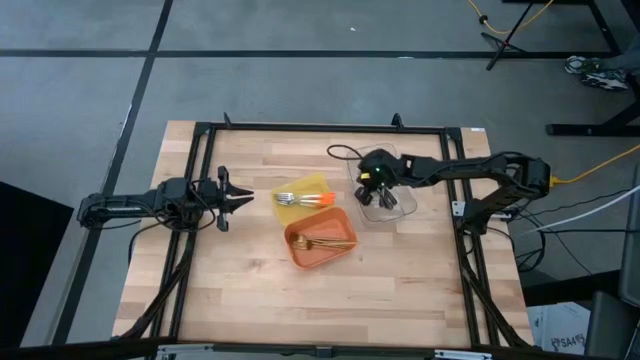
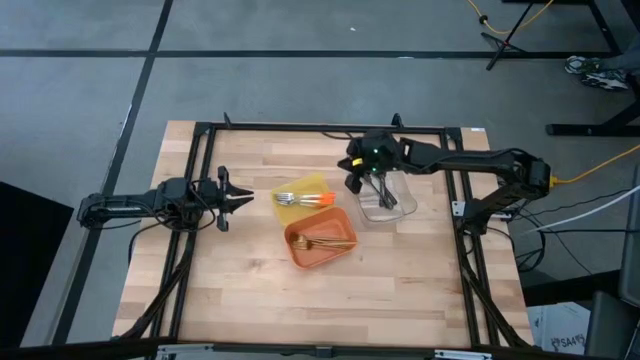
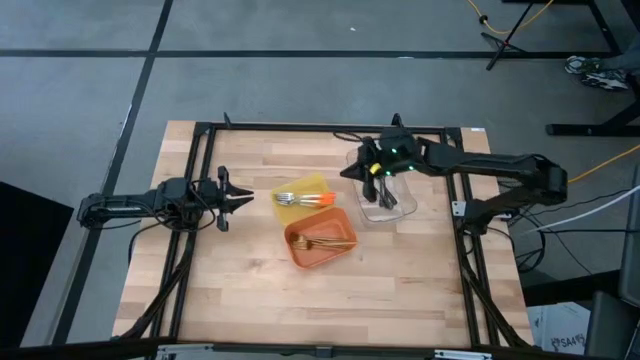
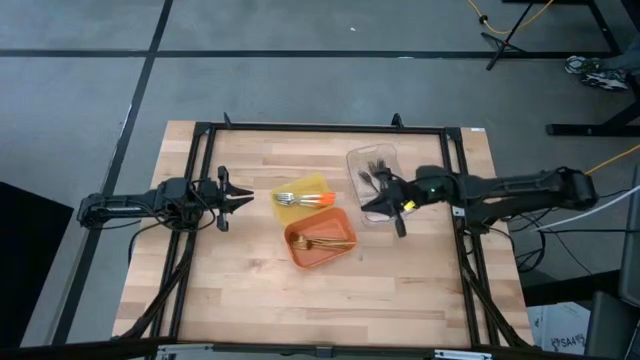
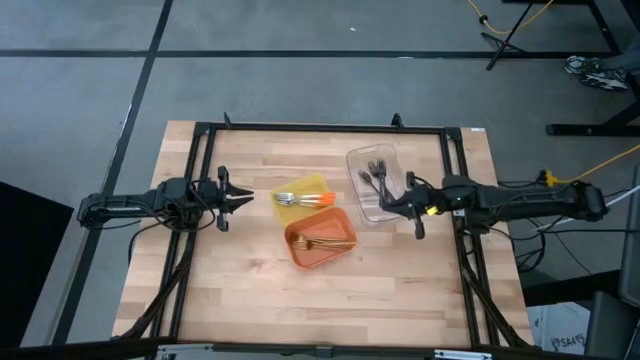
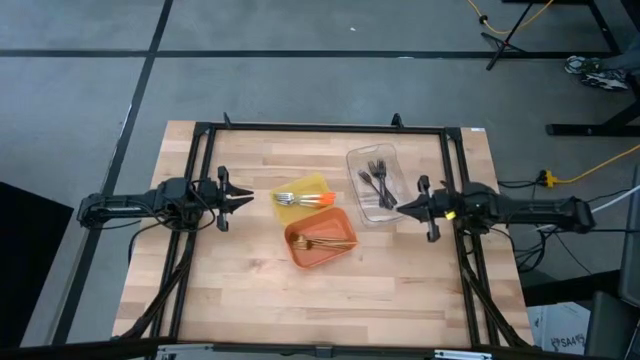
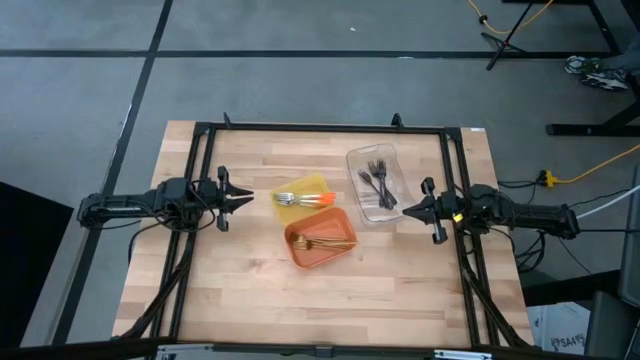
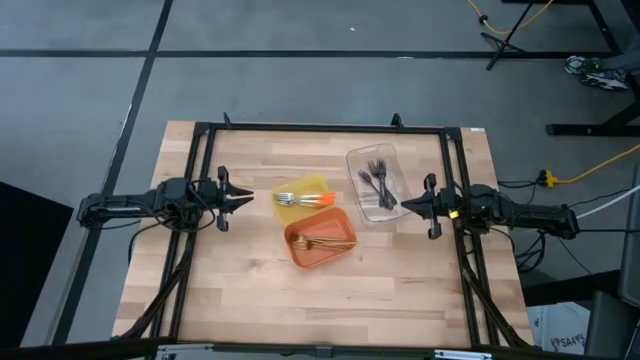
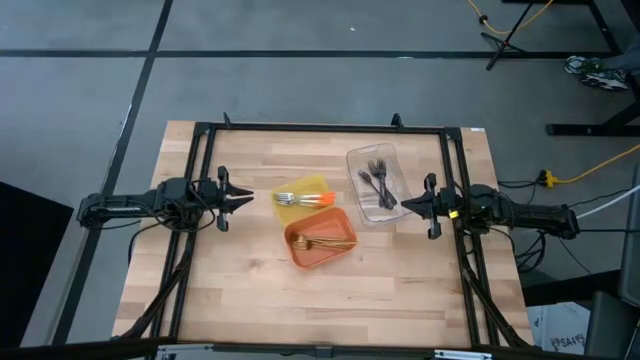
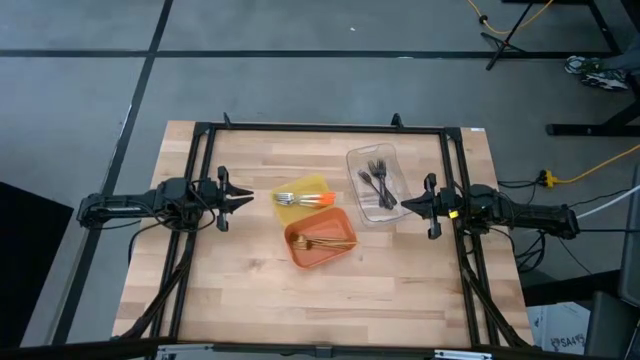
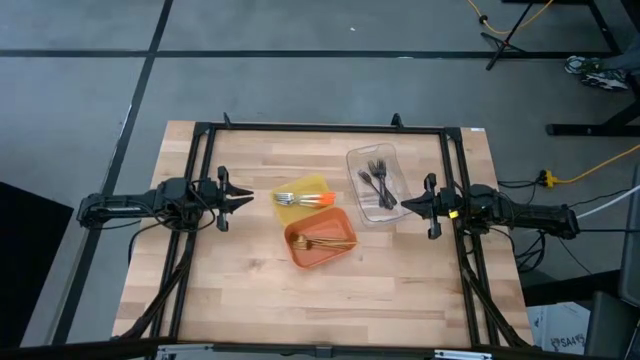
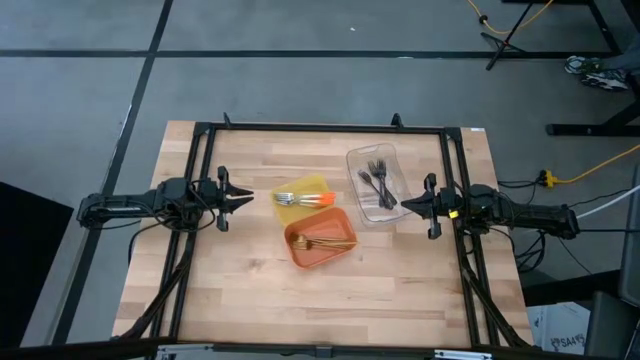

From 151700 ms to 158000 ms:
Task: Sort silverware by color (type)
Return to Home Position

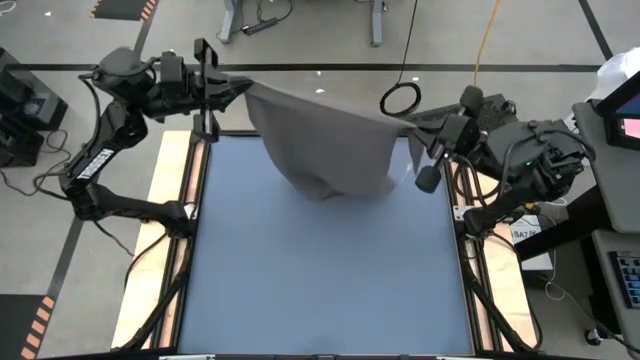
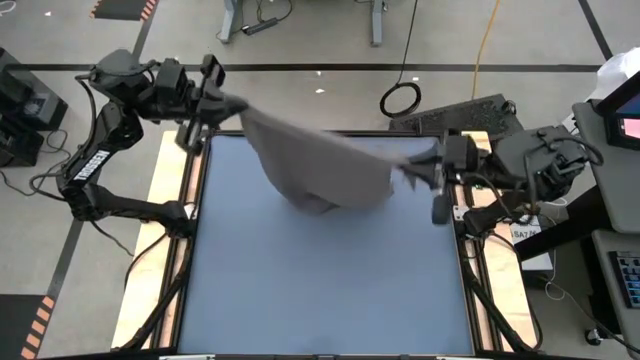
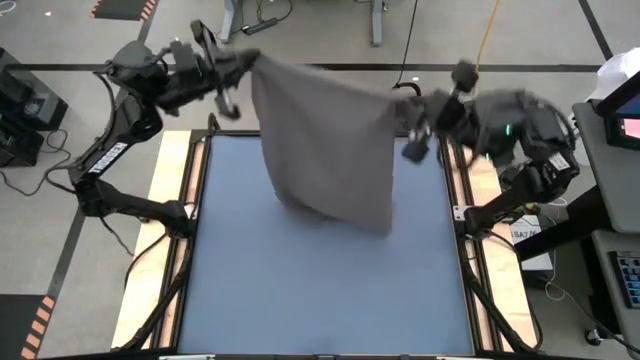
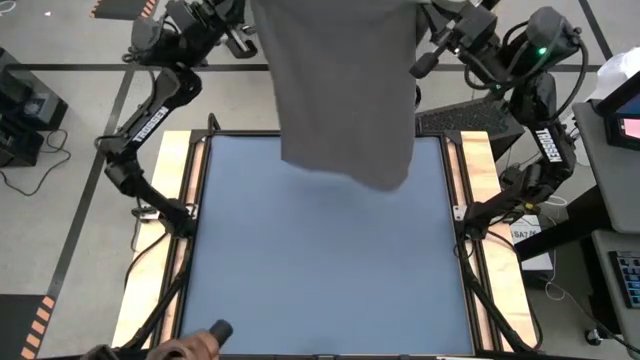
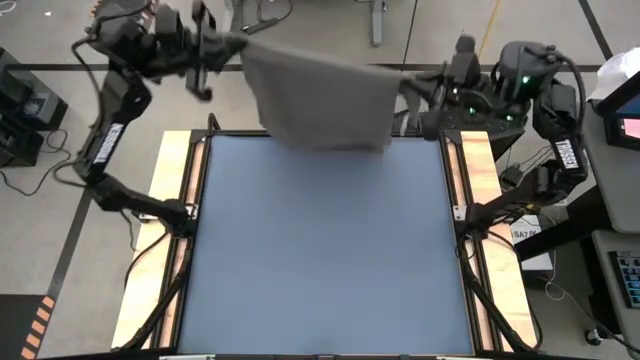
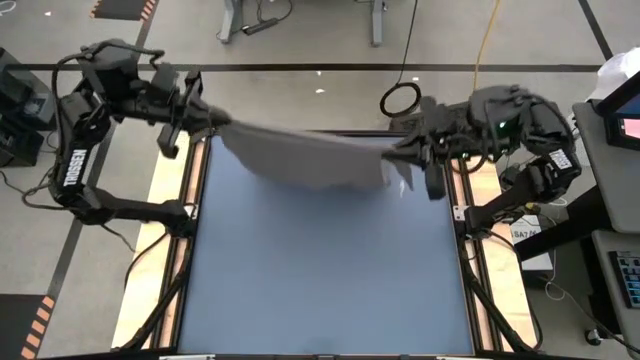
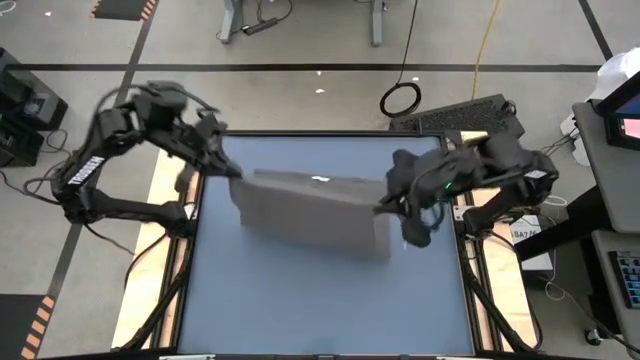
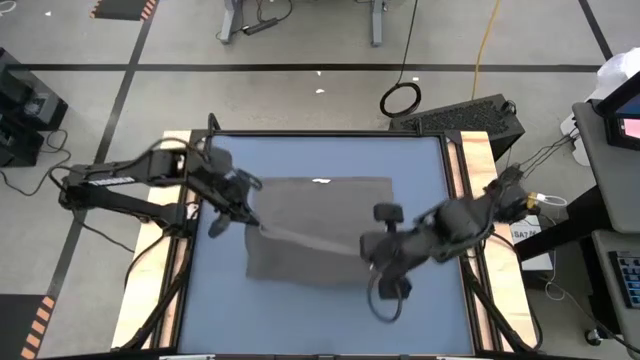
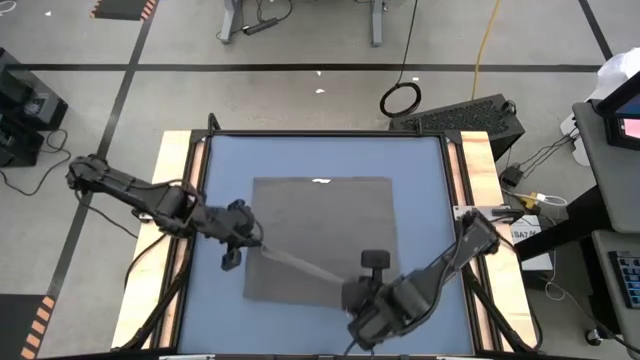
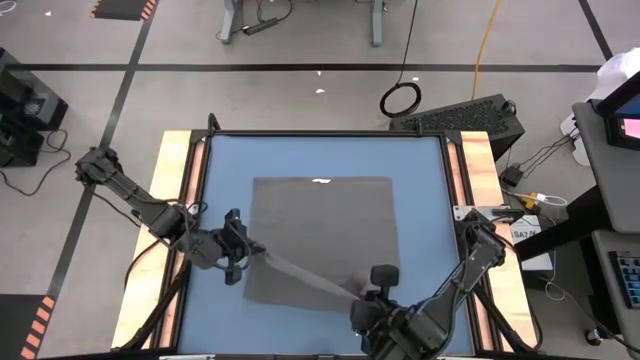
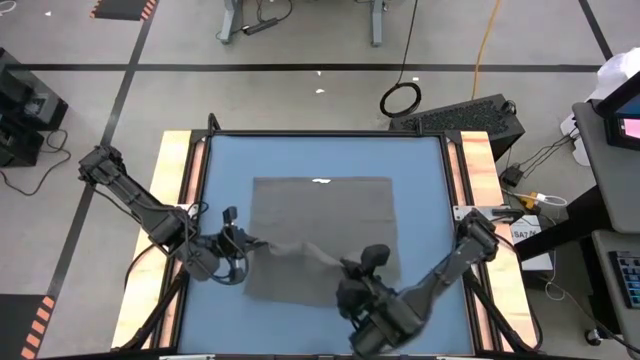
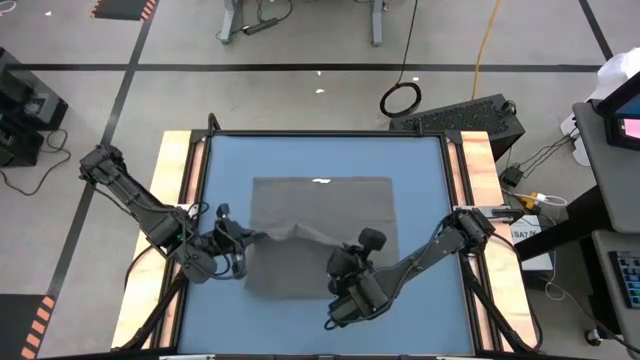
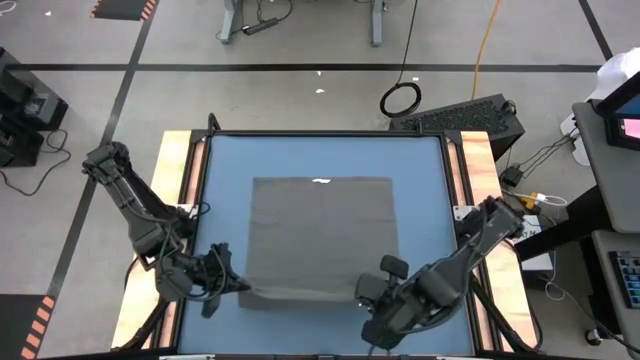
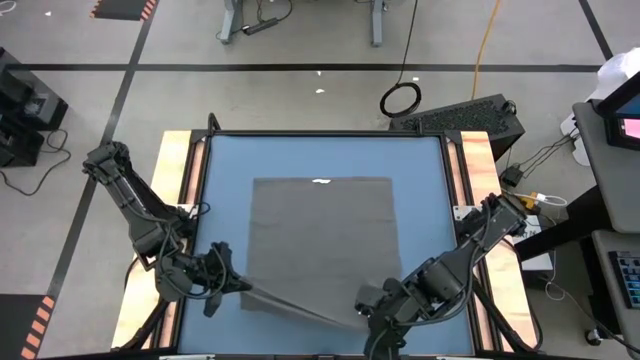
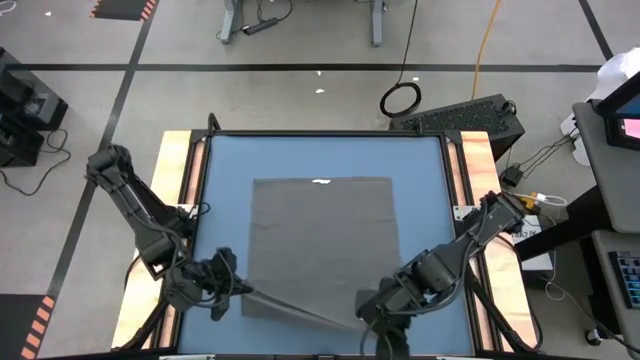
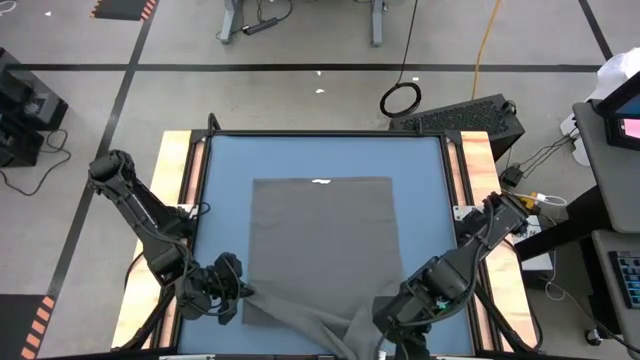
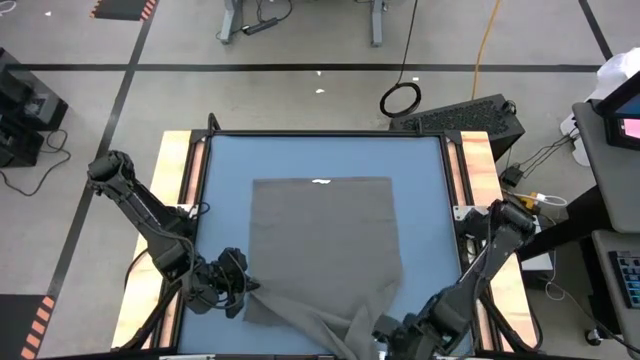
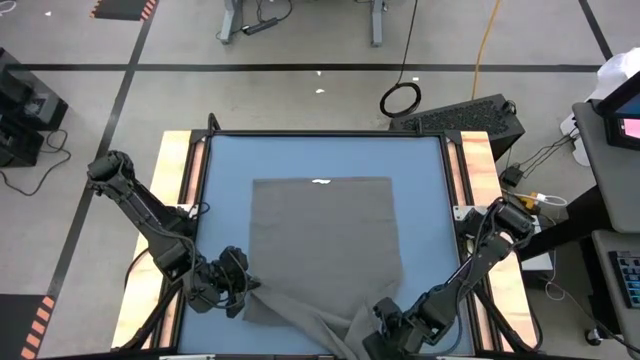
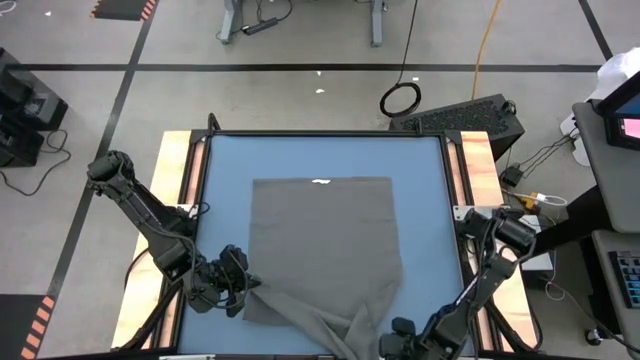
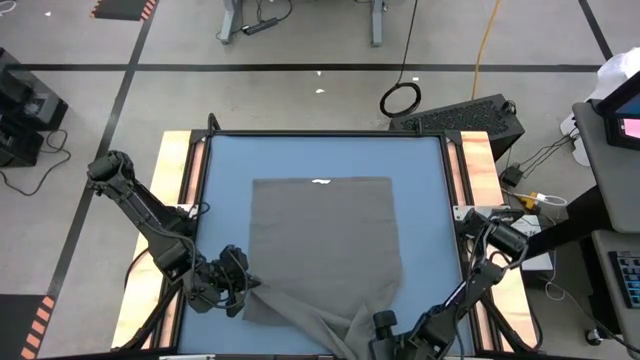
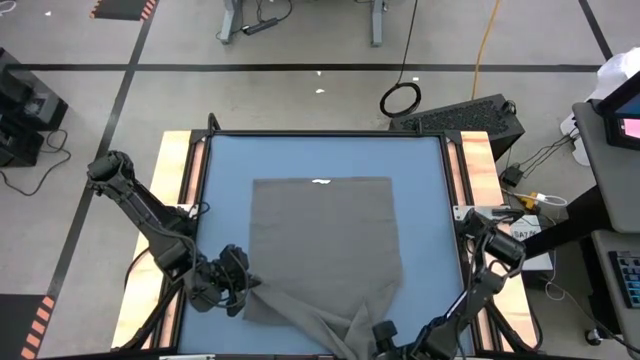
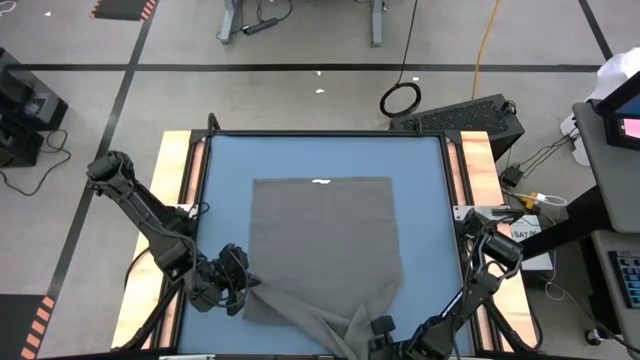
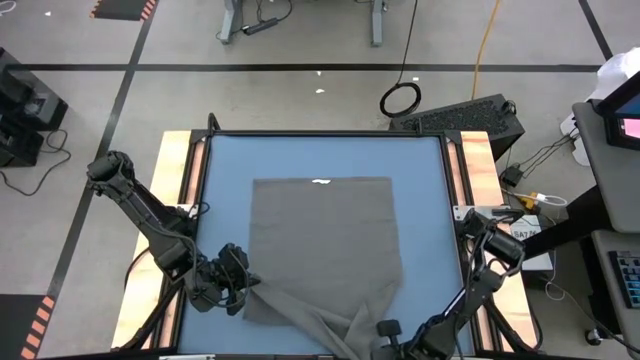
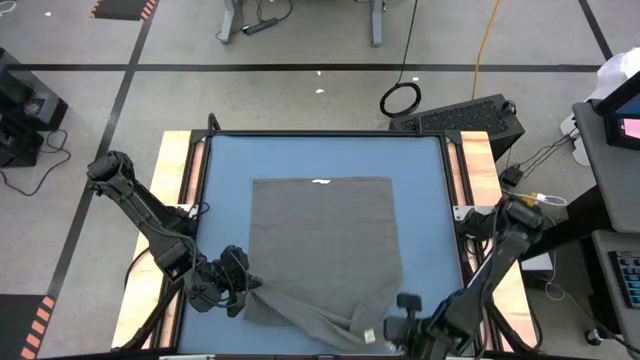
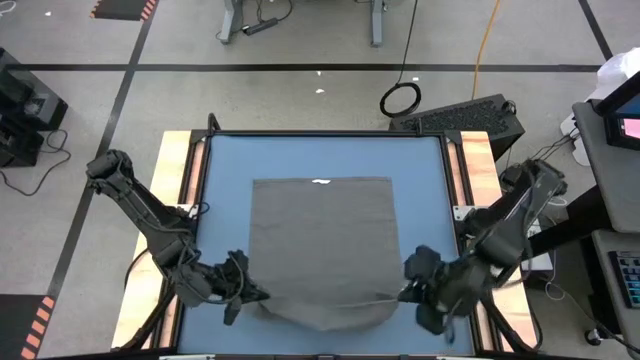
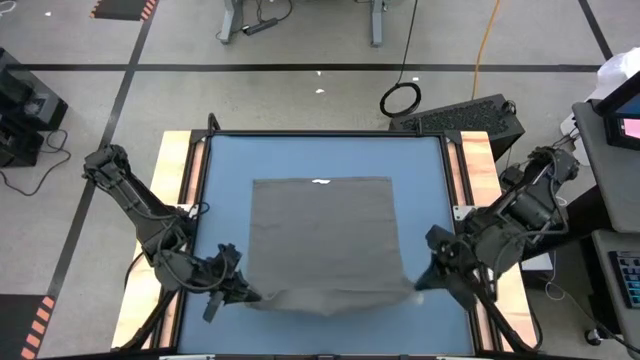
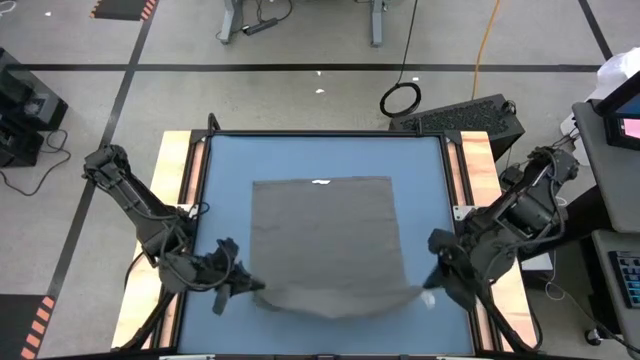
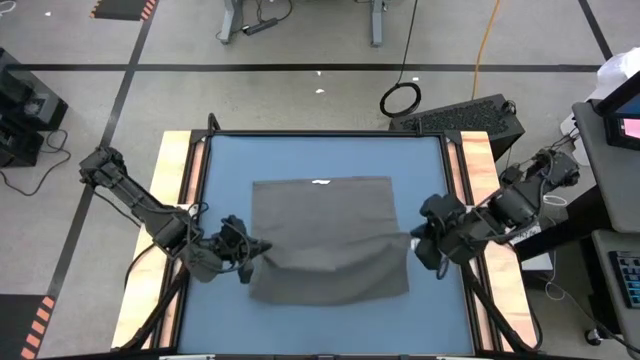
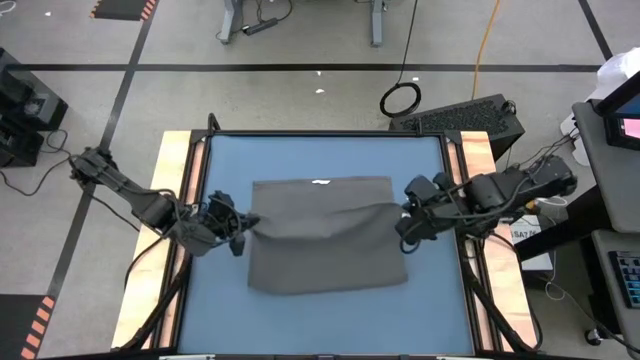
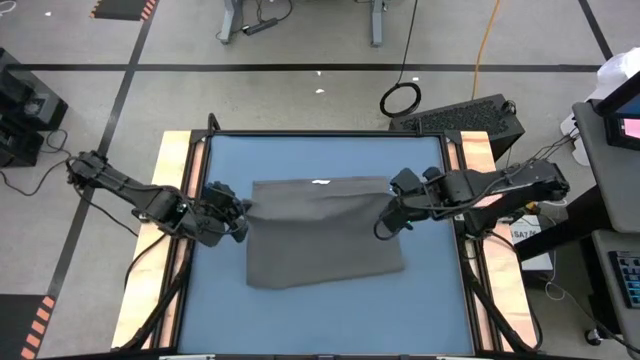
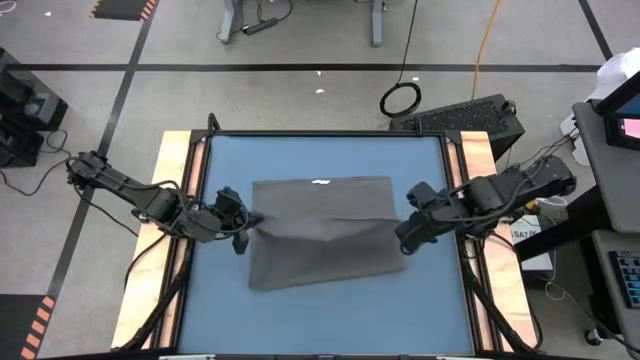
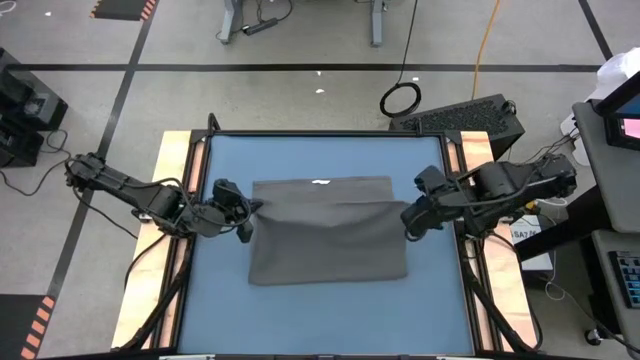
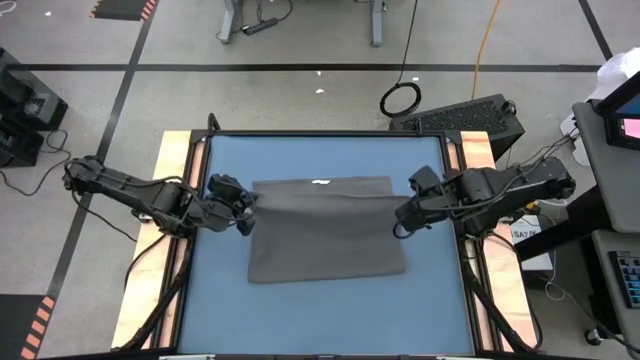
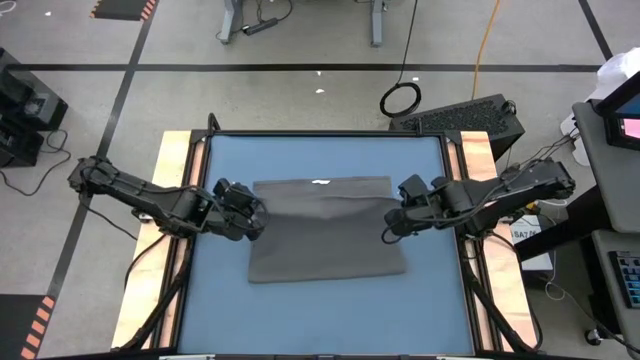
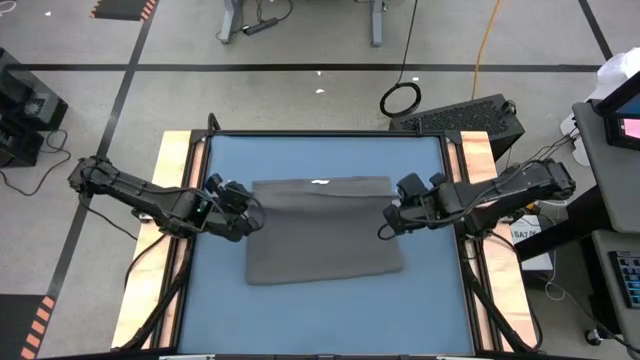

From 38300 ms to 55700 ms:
Task: Roll towel
Roll the gray towel
